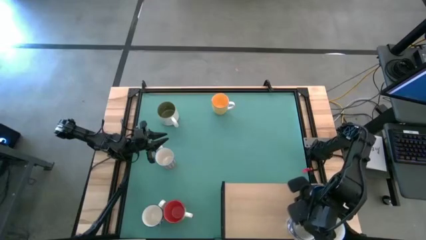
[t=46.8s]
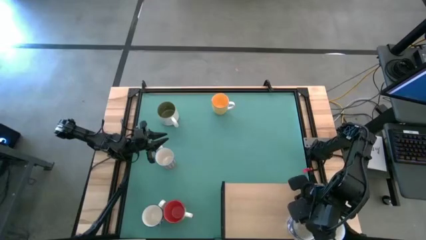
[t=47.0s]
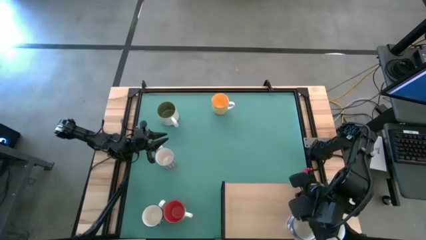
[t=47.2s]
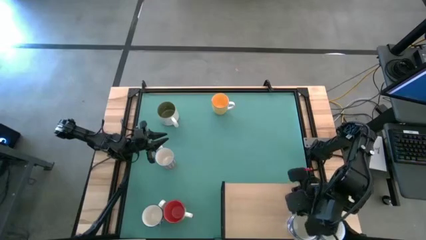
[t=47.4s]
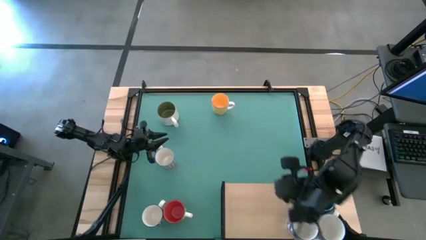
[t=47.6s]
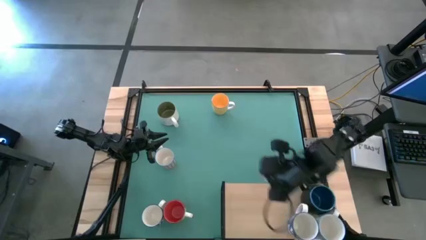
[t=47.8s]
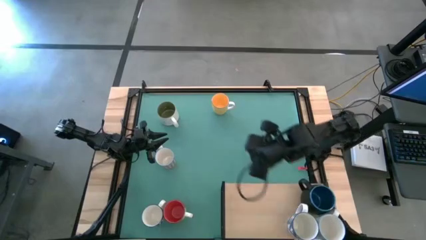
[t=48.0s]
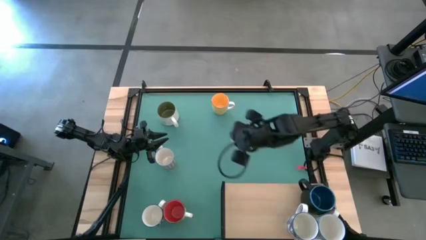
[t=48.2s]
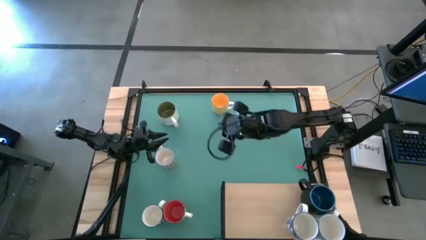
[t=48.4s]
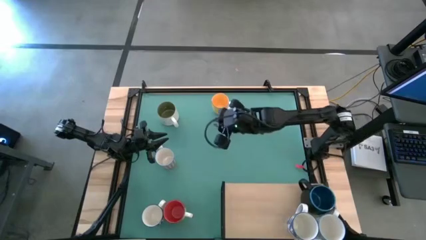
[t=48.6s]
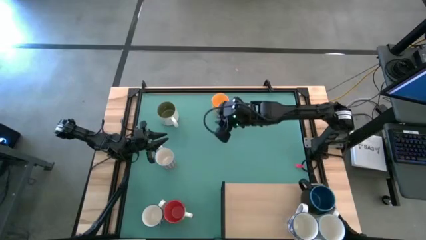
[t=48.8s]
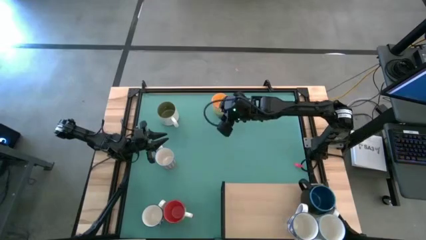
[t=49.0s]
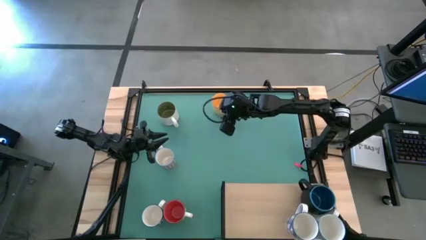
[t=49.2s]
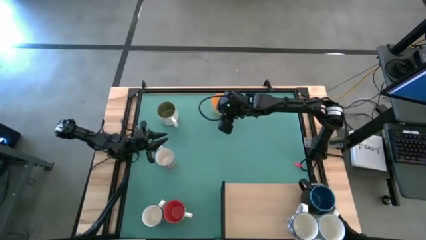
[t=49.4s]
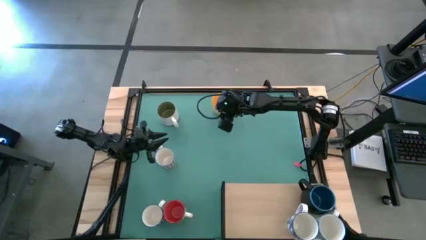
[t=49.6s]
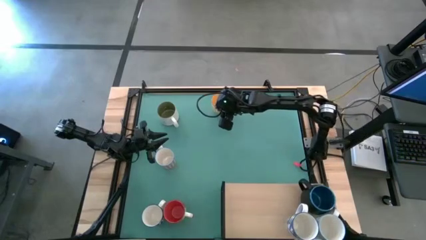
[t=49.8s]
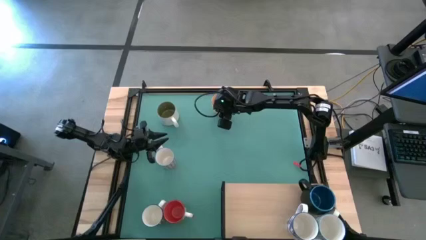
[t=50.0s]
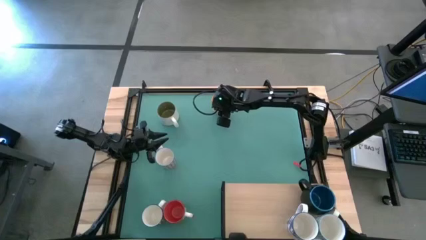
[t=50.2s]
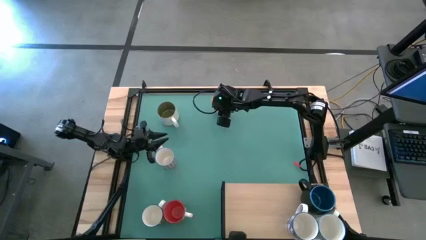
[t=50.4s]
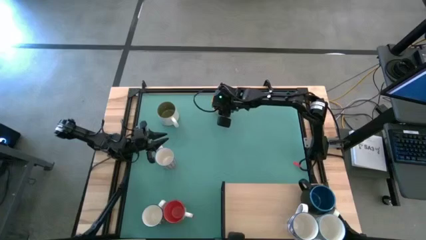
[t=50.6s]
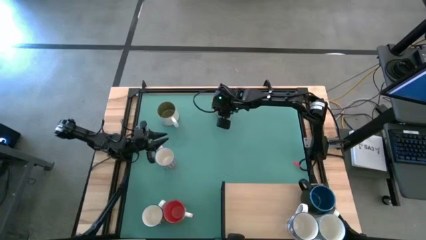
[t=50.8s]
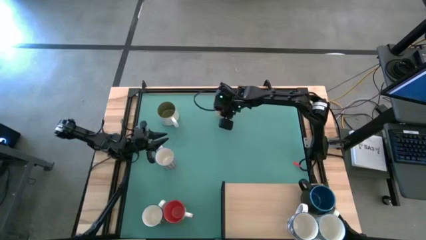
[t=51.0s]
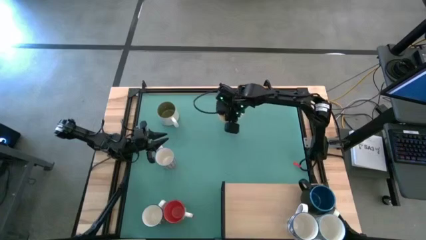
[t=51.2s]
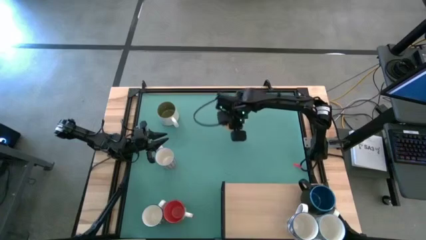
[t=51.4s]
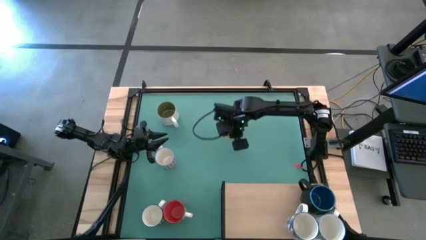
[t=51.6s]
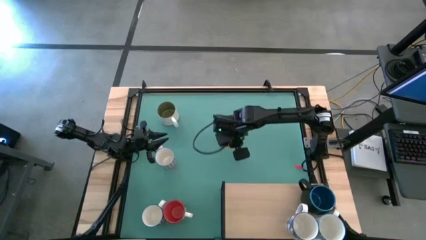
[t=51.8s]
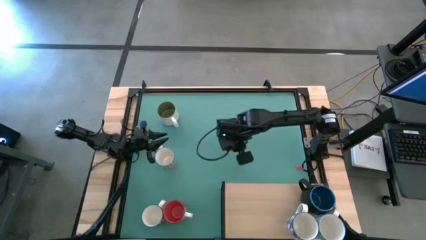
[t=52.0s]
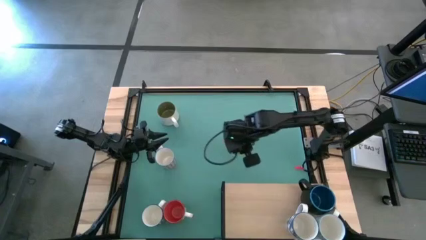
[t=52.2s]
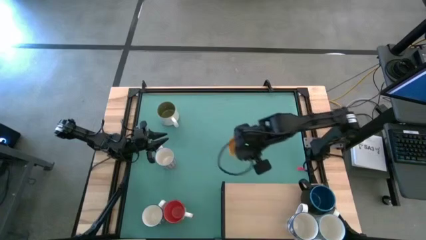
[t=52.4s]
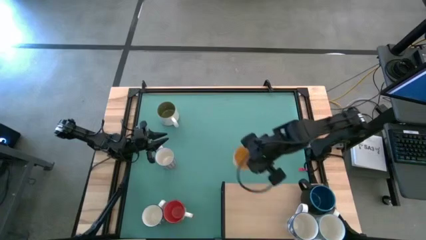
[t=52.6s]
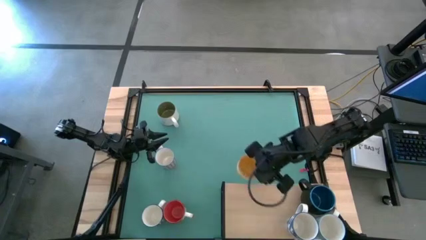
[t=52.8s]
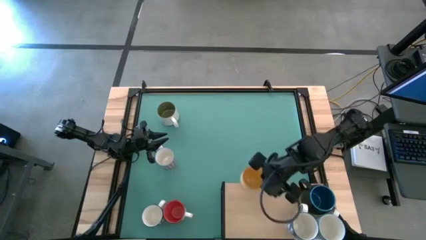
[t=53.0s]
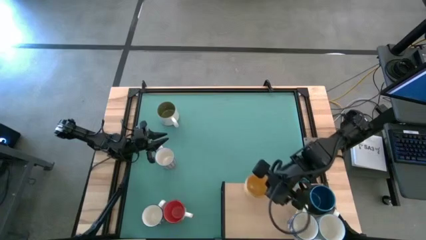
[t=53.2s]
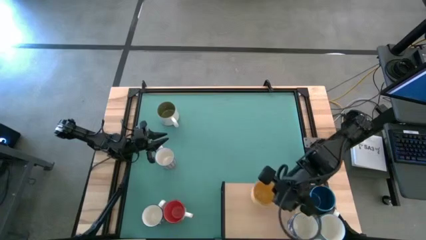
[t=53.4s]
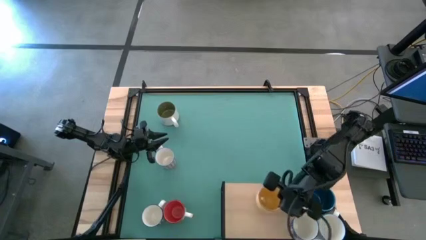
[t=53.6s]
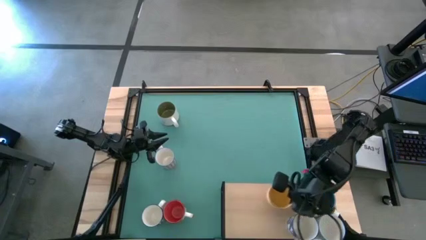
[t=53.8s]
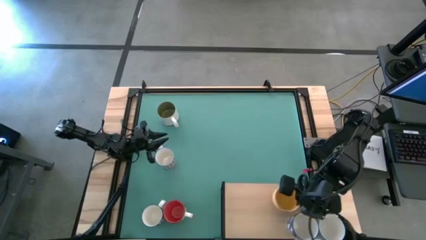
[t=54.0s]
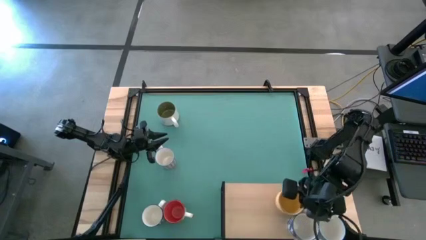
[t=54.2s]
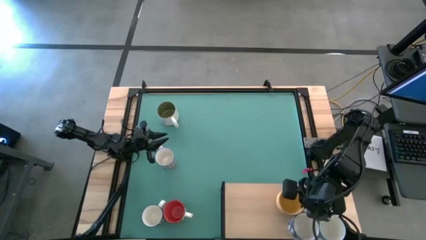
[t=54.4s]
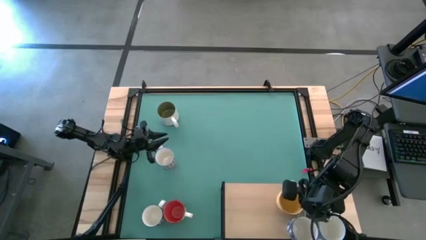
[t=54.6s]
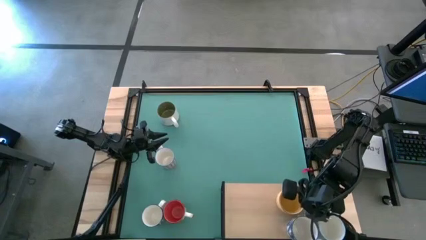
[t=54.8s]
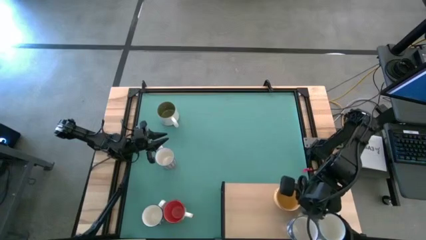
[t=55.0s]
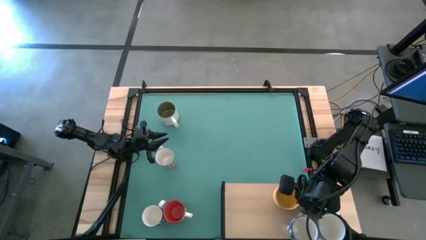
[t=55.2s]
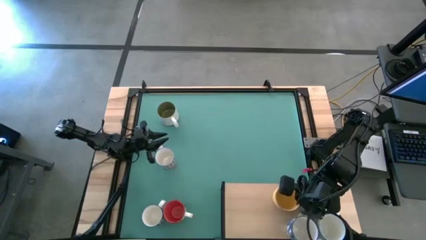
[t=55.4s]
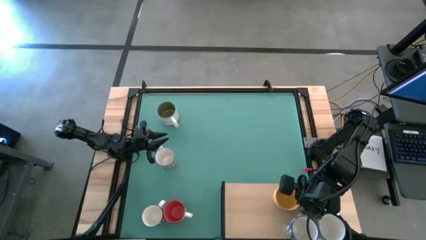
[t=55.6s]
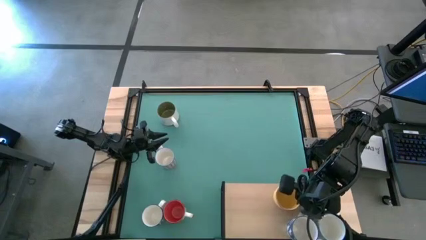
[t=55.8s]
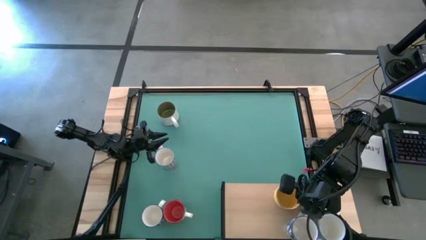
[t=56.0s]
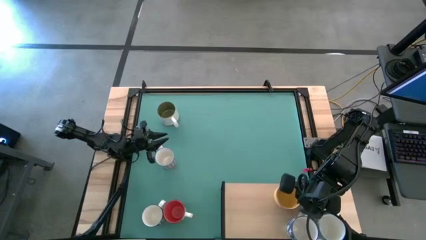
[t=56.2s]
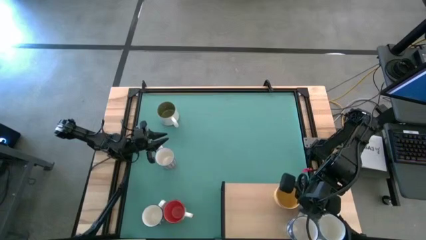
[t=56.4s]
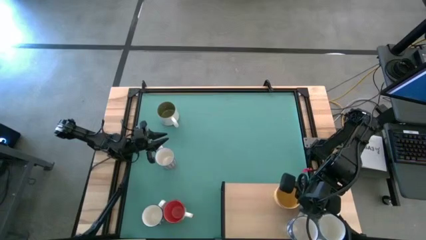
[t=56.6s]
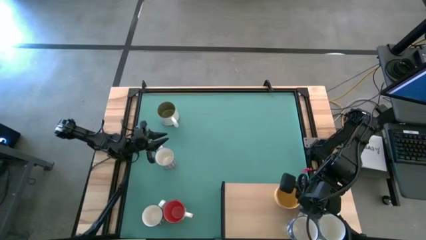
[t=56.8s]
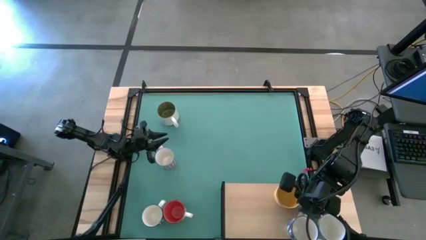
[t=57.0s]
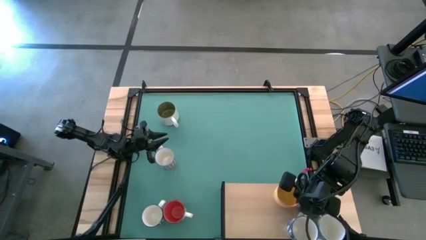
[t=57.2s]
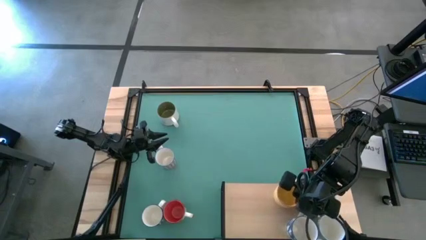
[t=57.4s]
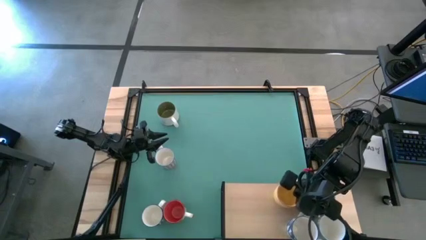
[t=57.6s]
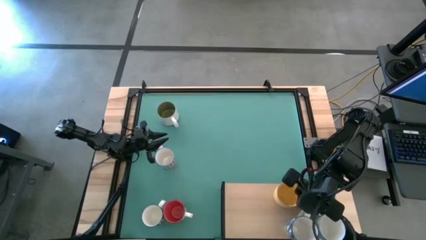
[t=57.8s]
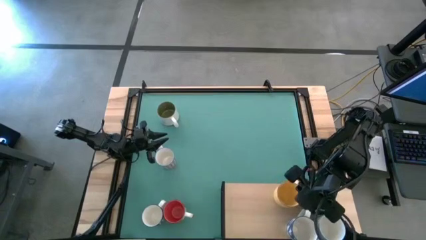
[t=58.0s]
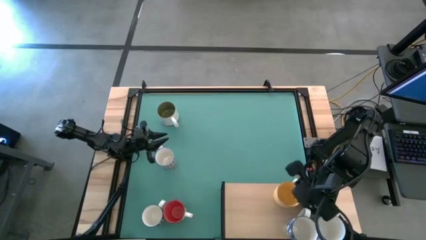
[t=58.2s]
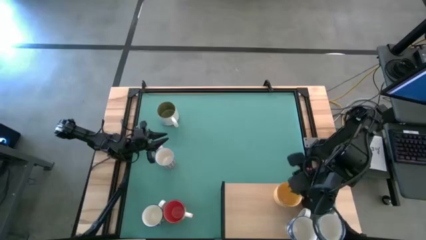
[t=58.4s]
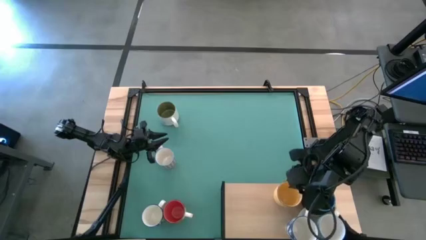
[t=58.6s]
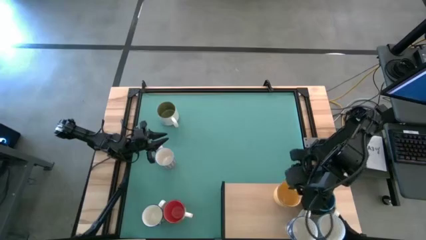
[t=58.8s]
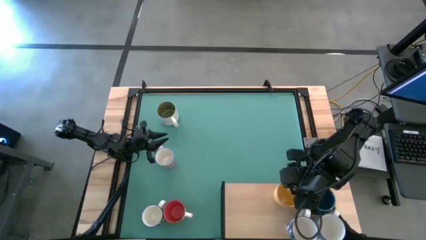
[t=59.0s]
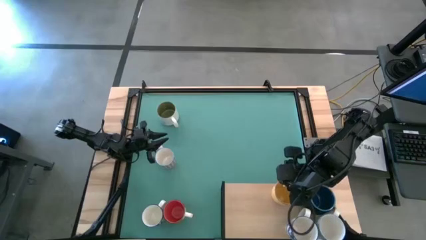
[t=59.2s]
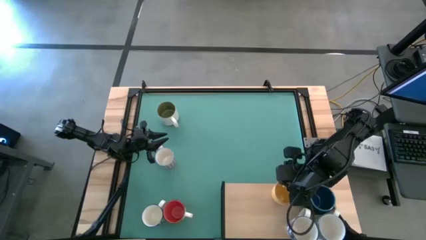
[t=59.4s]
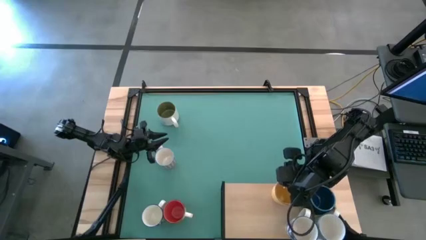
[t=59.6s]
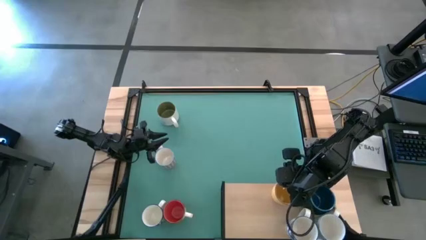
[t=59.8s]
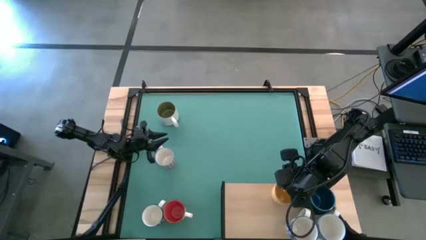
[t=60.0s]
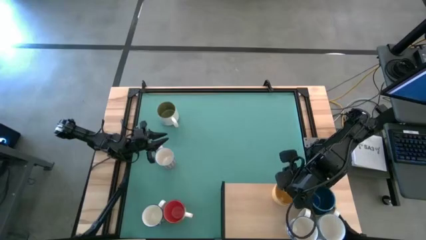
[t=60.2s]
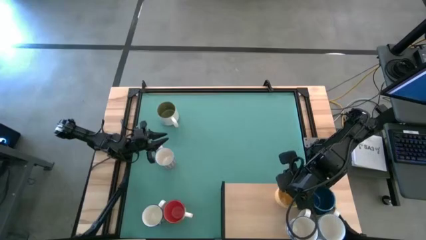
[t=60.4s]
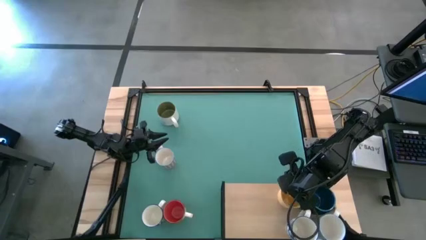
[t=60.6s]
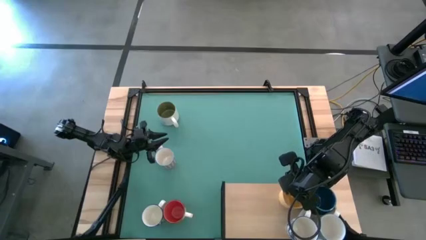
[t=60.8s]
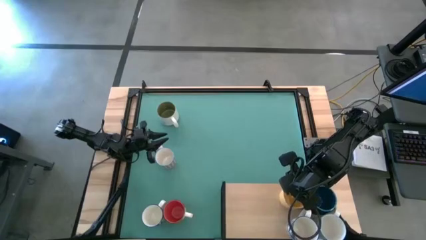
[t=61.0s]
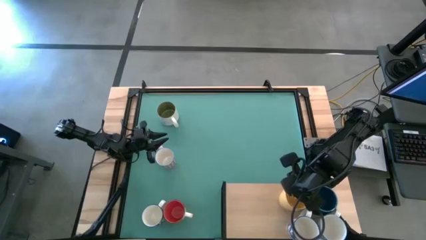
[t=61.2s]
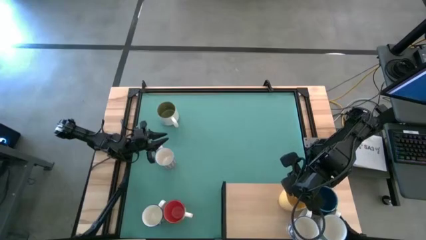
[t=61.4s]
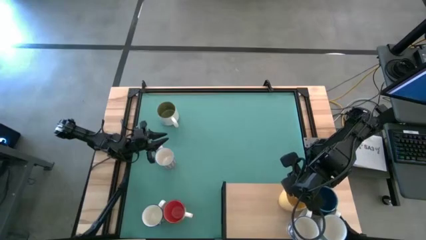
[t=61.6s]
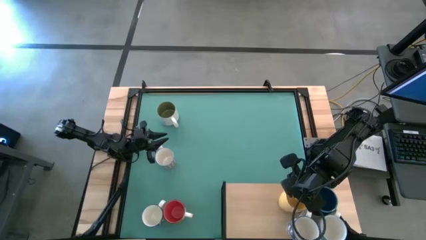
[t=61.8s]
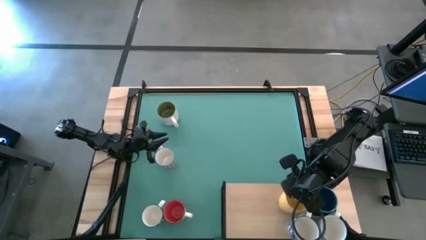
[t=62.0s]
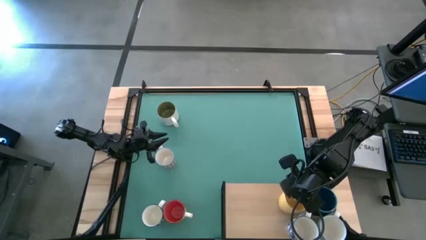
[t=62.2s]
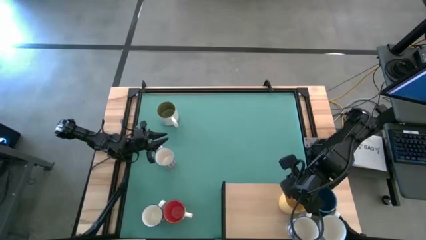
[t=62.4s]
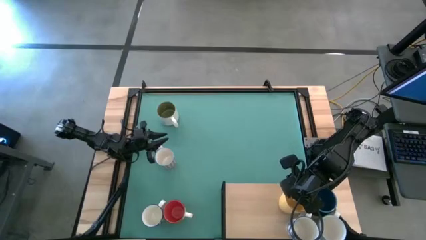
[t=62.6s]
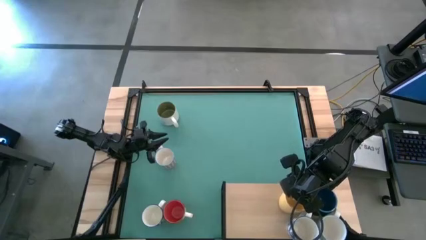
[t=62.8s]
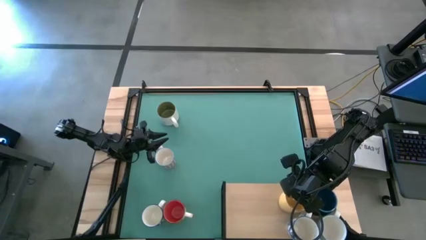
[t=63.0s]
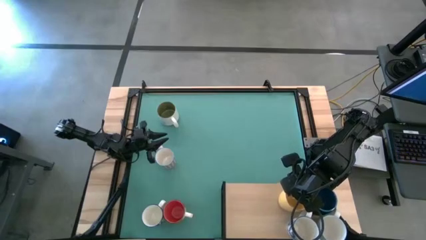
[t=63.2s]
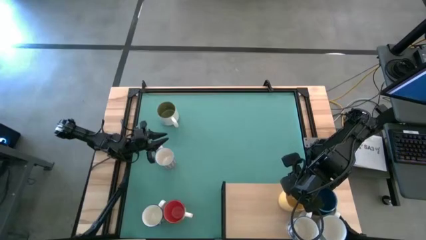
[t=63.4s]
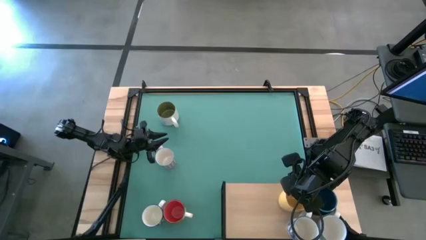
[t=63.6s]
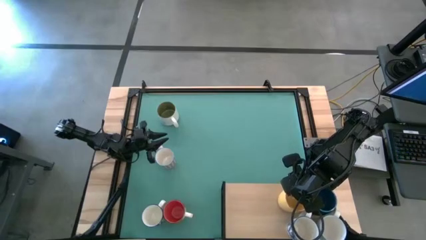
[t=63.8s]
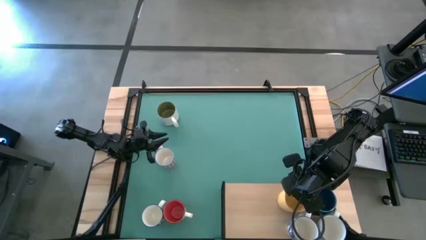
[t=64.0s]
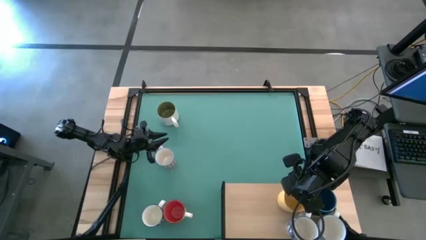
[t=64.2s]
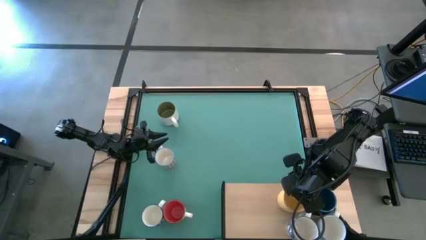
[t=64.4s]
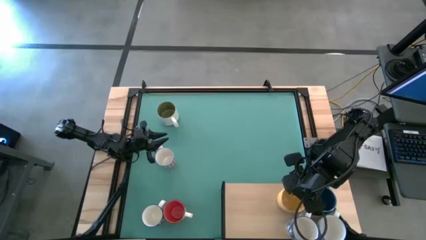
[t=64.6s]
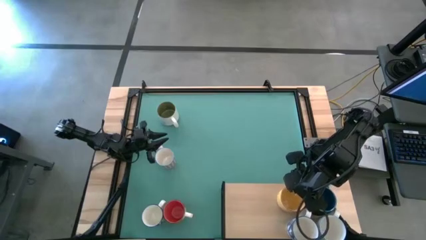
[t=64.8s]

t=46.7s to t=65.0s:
Task: Place coffee mugs
Put the yellow mug on the shelf
